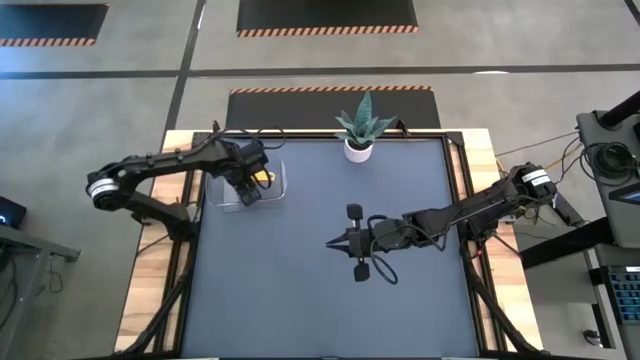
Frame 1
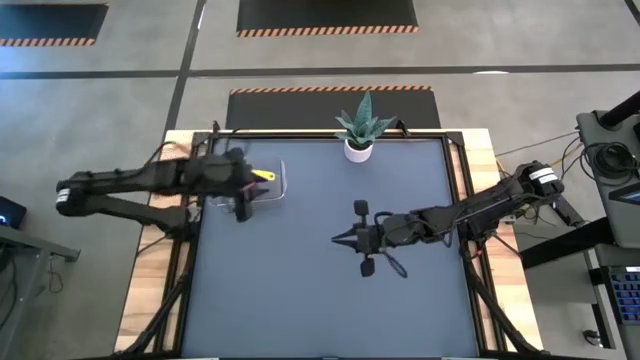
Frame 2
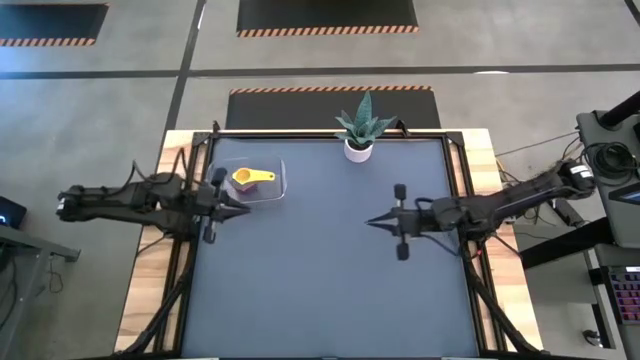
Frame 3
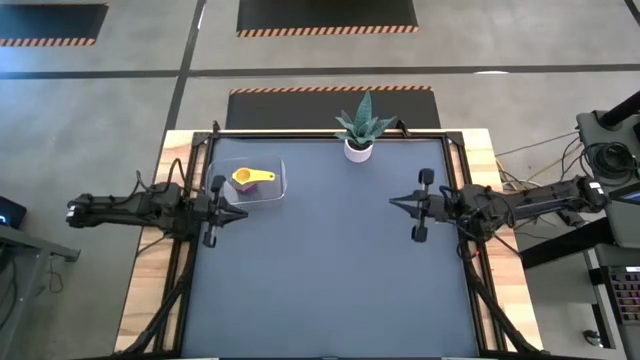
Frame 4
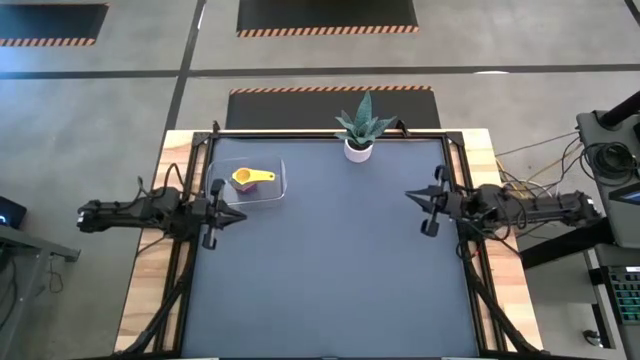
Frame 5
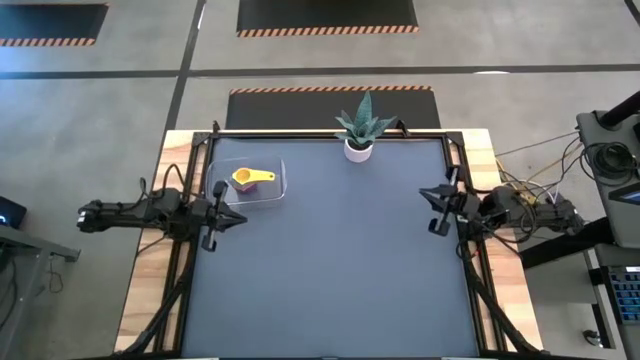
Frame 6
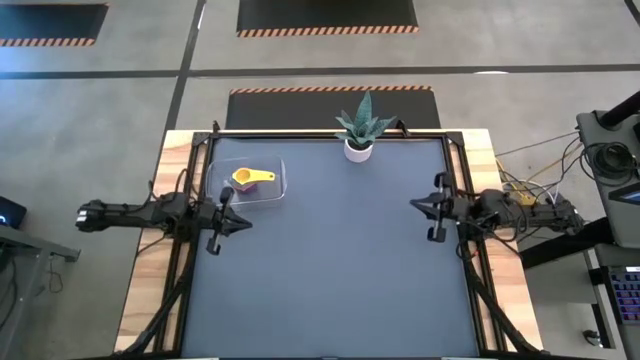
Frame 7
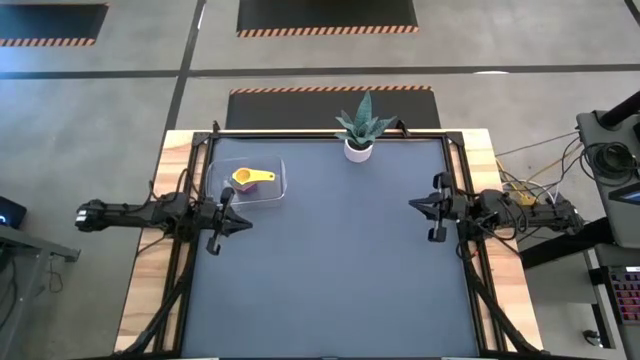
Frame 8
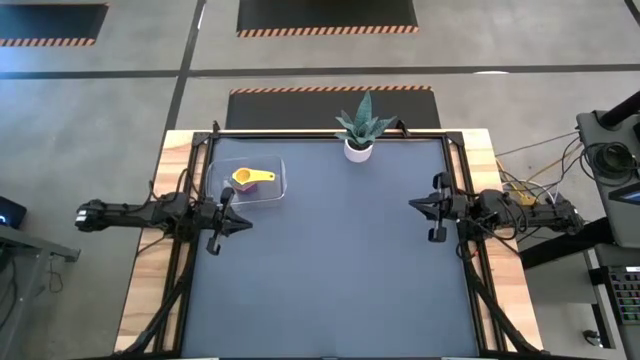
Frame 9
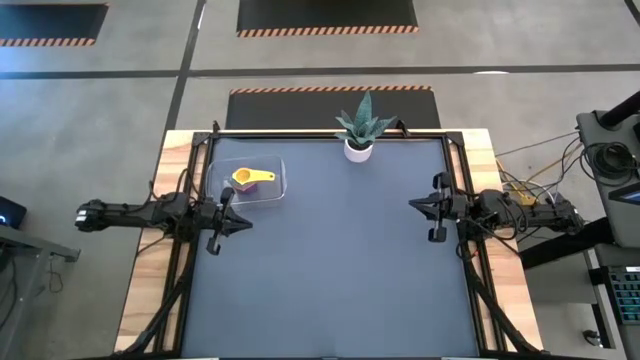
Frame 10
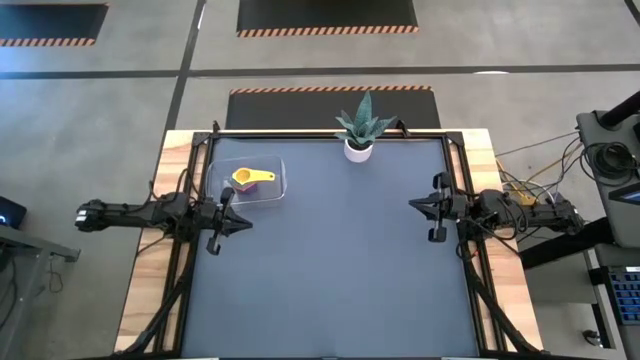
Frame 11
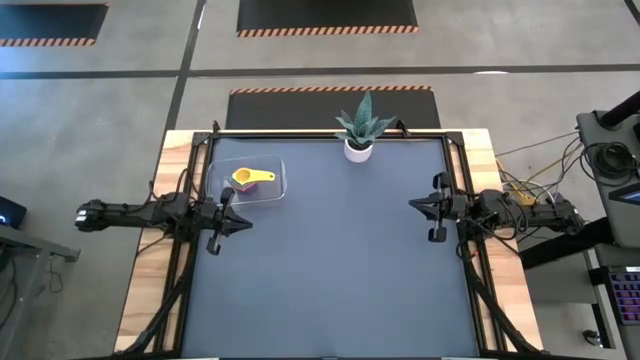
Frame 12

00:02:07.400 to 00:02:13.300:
Task: Nest measuring cups in basket
Return to Home Position

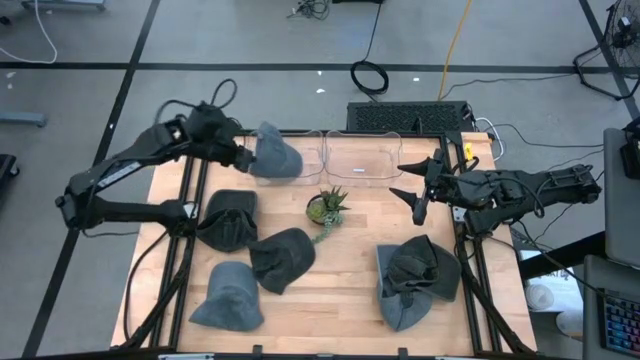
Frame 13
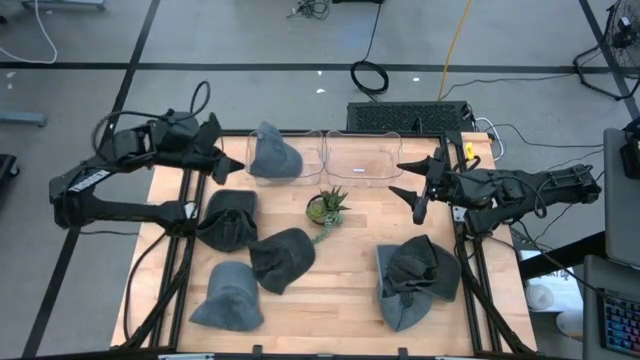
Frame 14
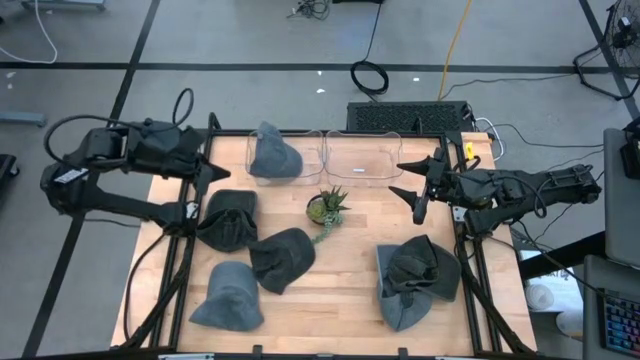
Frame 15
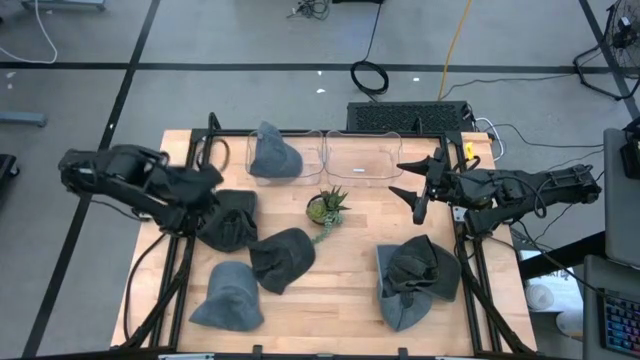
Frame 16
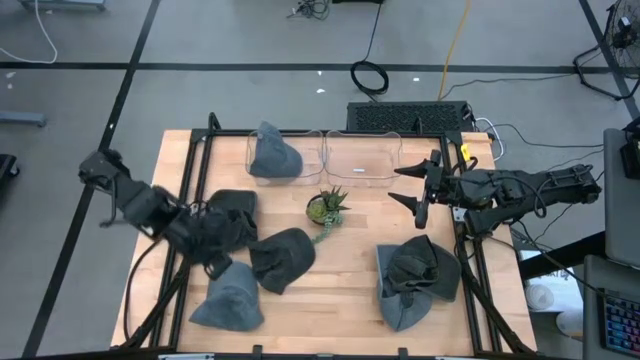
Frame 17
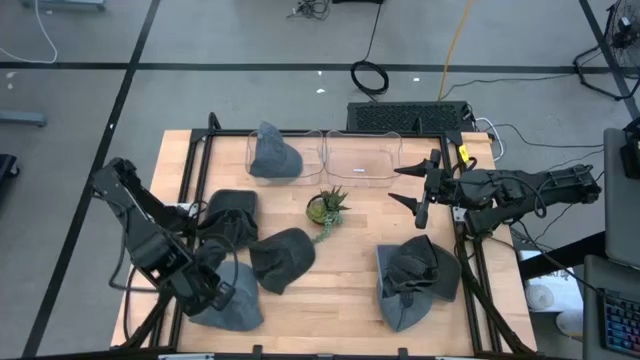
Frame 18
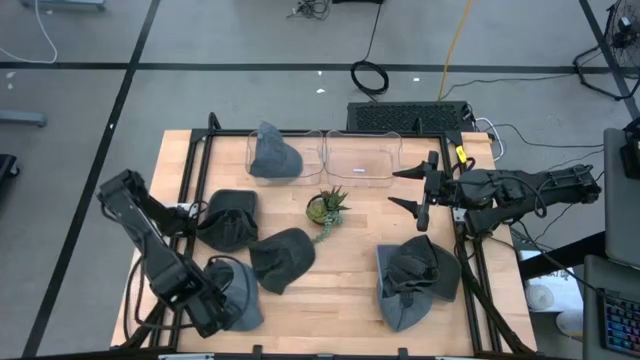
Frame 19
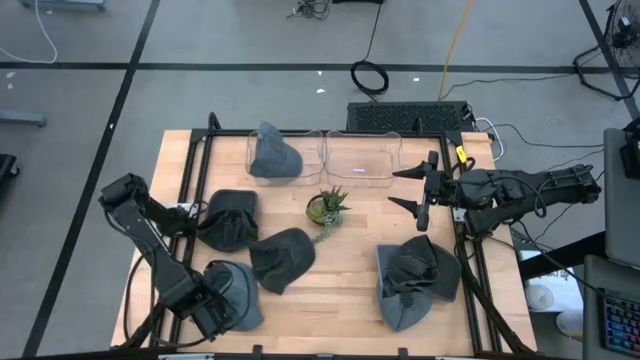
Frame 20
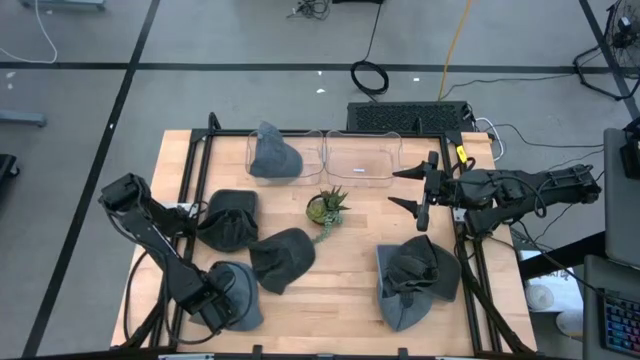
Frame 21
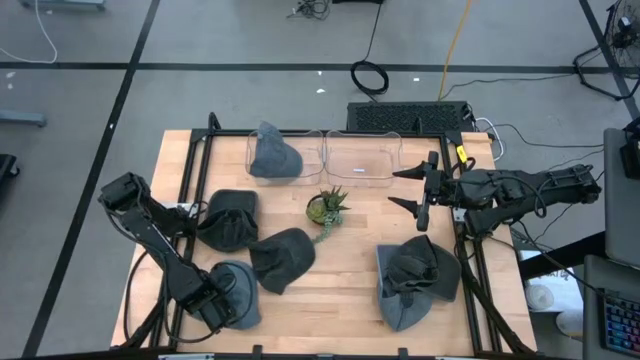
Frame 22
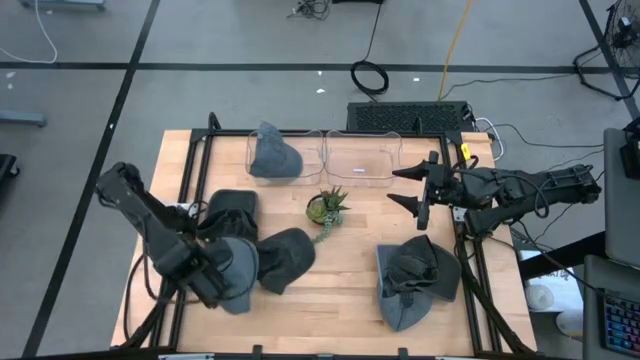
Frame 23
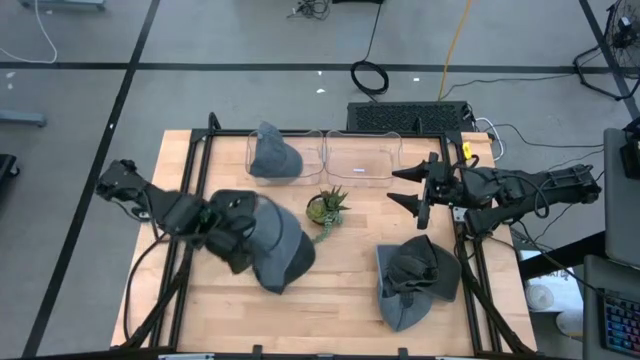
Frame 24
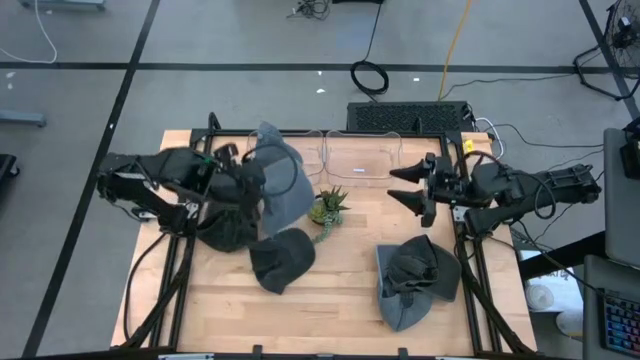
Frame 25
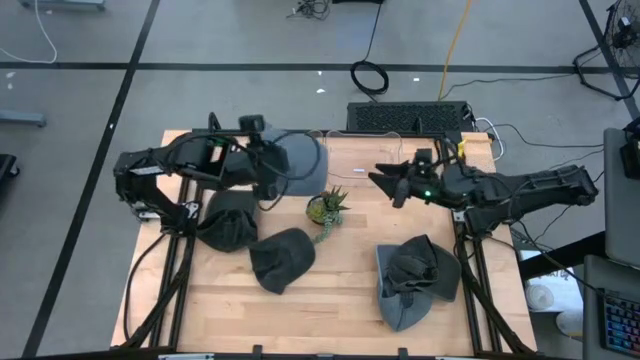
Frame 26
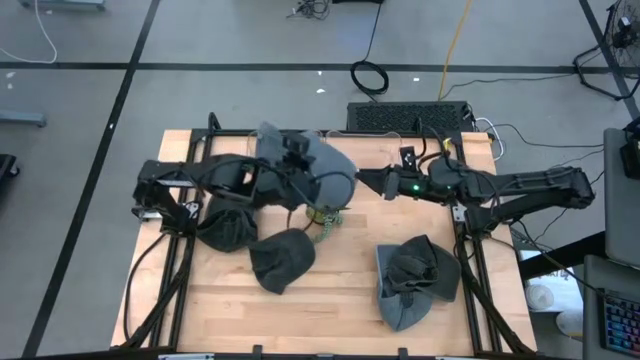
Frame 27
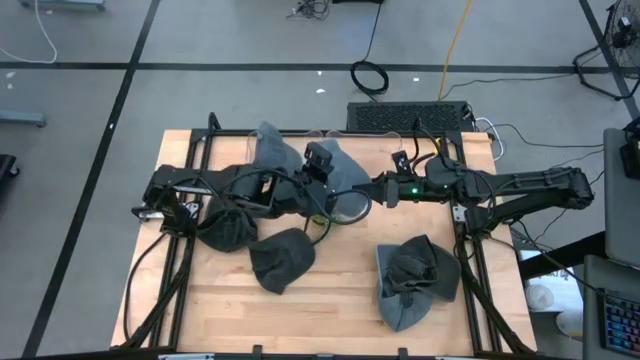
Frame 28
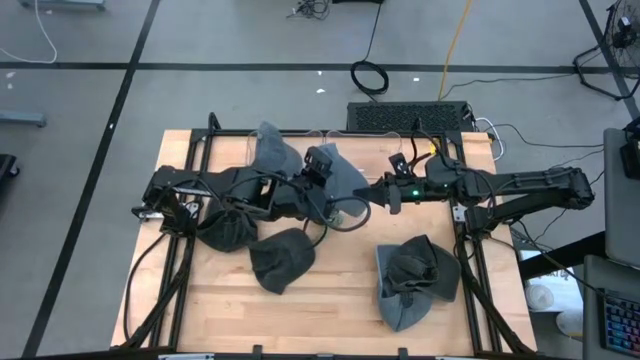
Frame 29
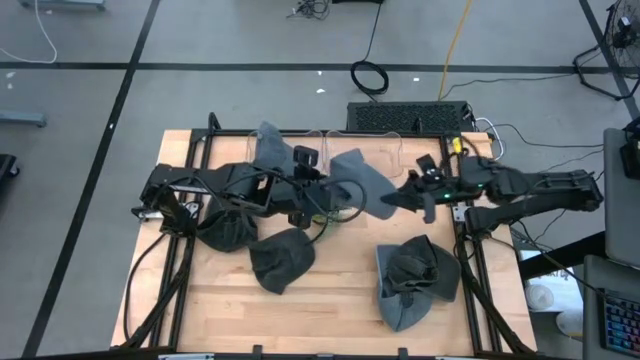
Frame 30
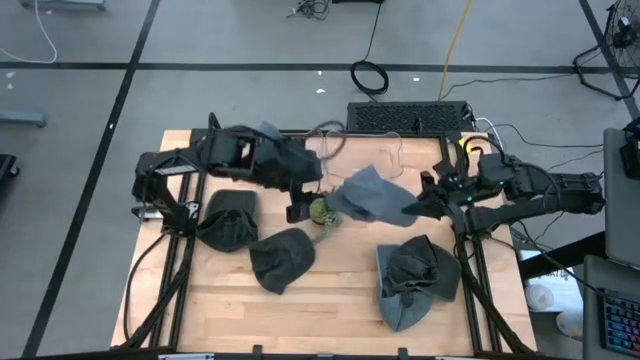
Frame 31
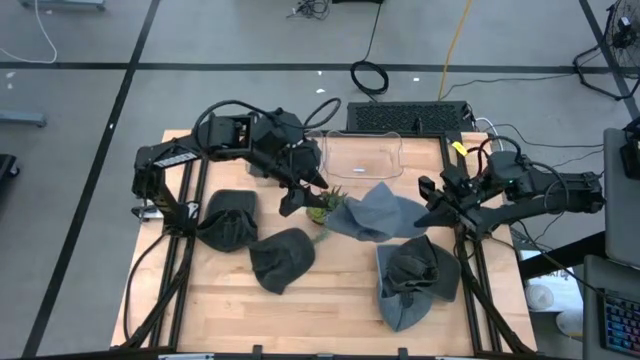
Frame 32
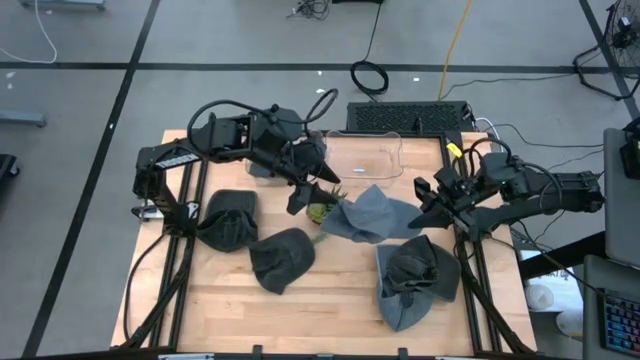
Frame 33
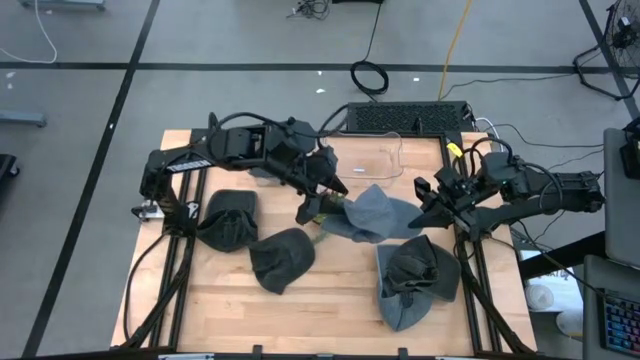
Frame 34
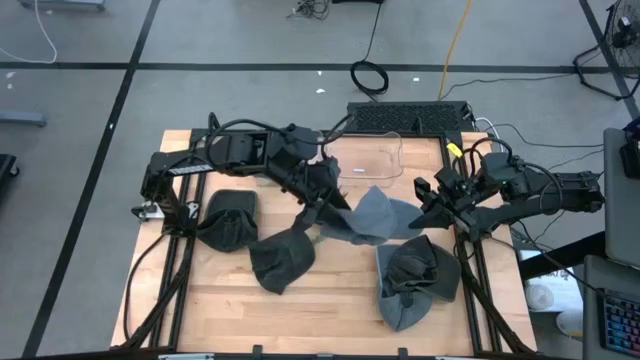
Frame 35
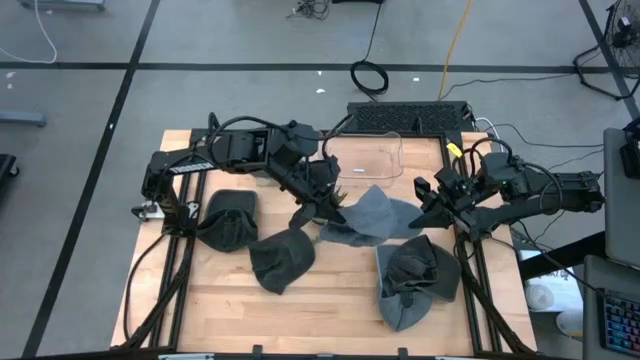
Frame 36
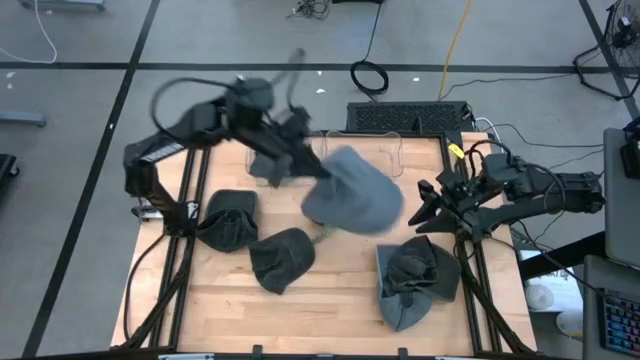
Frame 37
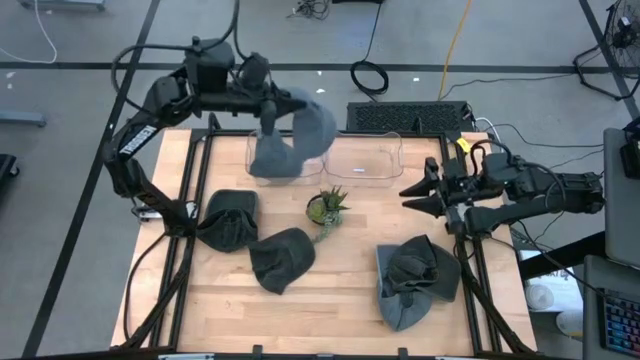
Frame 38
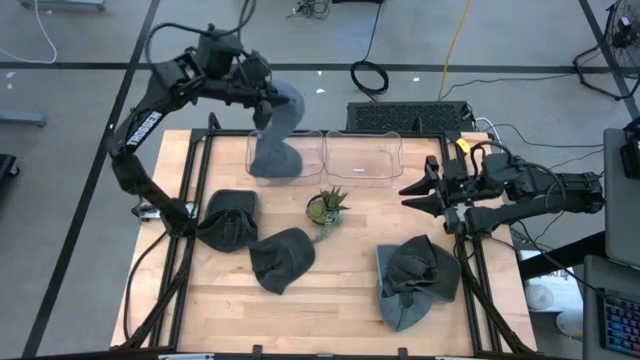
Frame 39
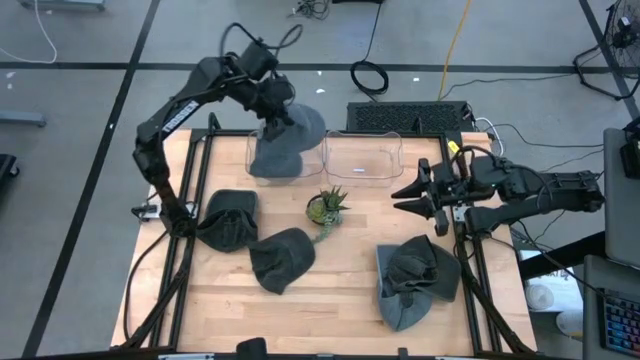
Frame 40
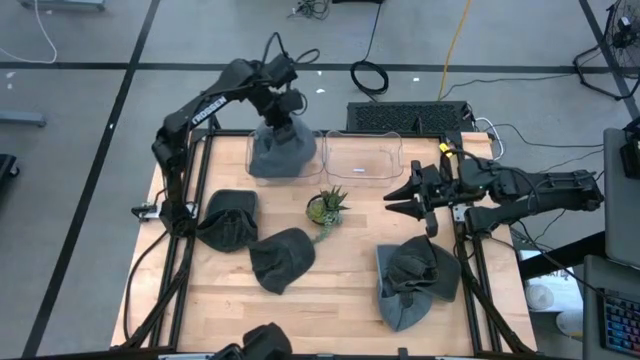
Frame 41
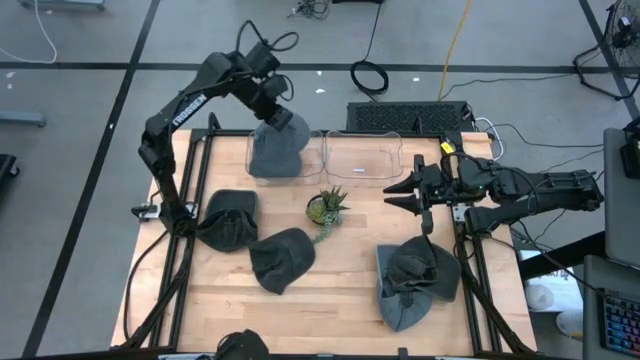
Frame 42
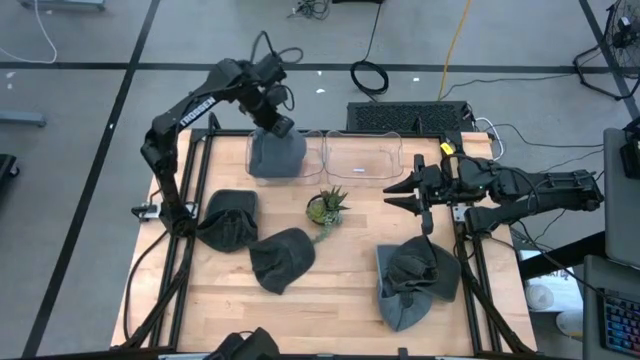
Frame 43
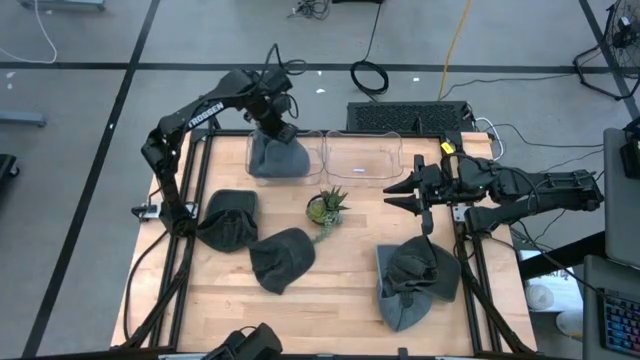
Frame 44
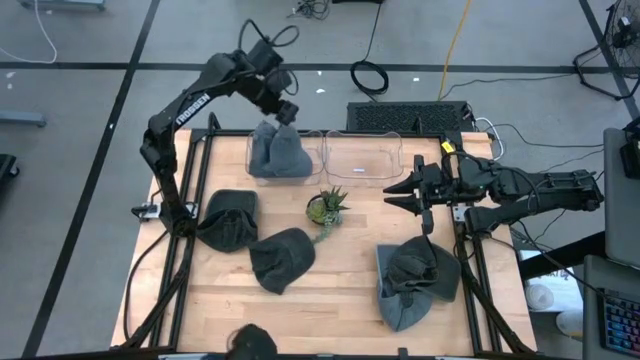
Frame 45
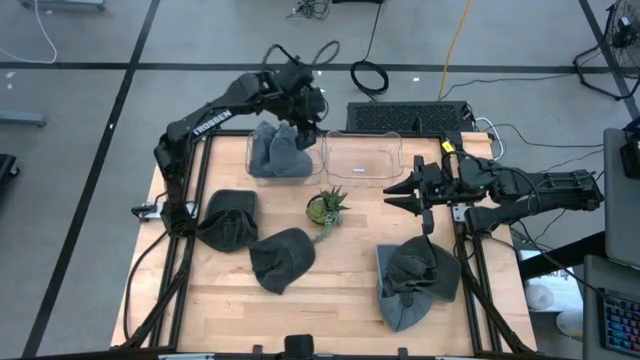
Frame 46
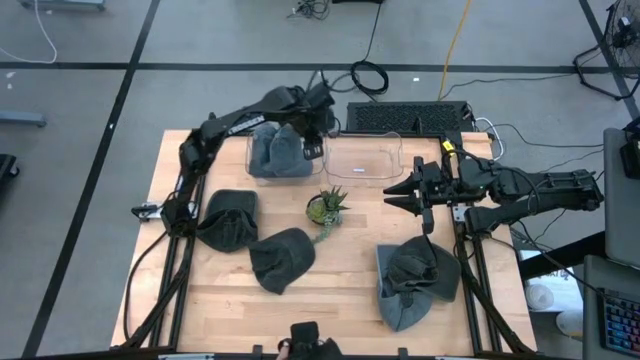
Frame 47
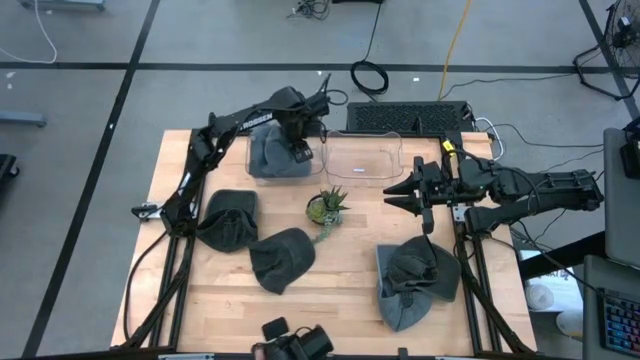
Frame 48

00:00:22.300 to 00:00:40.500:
Task: Pick & Place hat
Put the left gray cap into the left transparent bin
